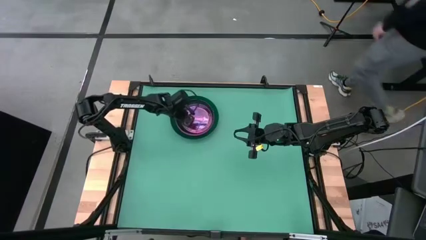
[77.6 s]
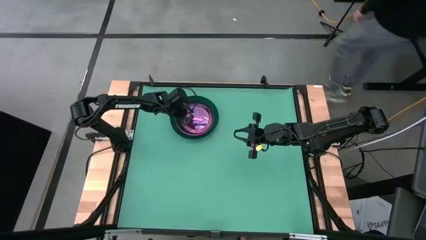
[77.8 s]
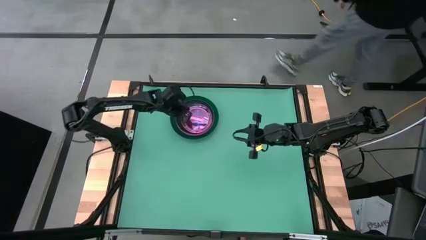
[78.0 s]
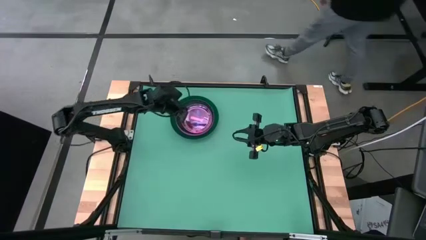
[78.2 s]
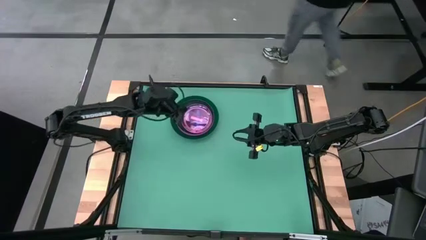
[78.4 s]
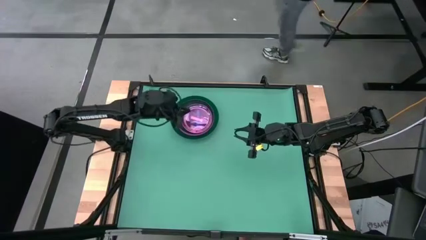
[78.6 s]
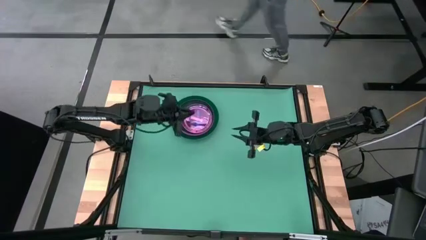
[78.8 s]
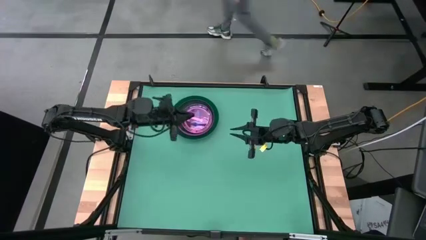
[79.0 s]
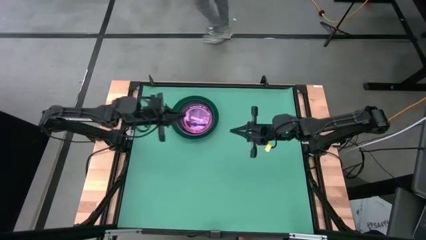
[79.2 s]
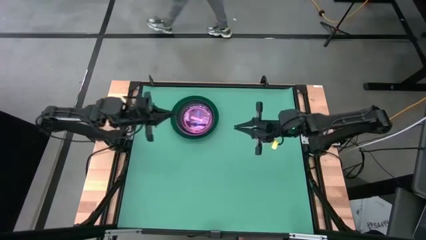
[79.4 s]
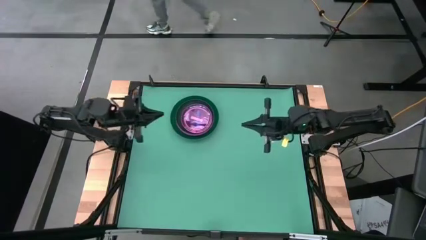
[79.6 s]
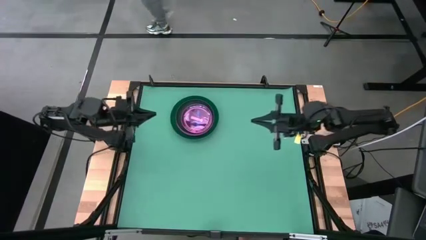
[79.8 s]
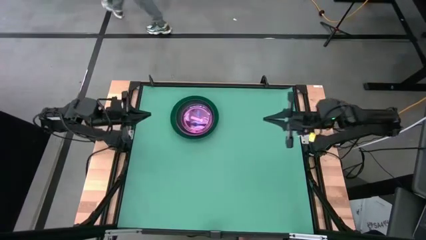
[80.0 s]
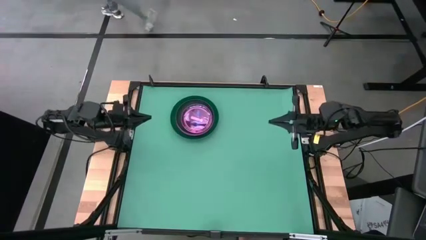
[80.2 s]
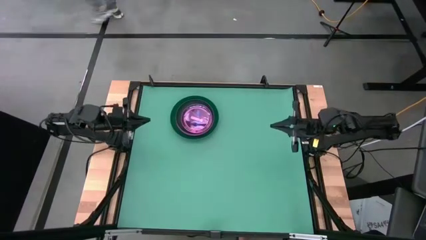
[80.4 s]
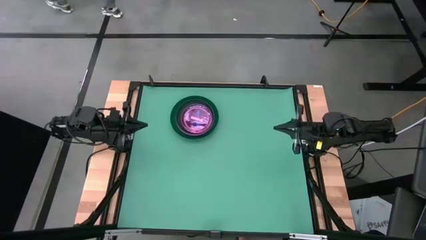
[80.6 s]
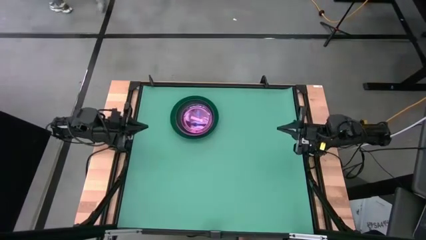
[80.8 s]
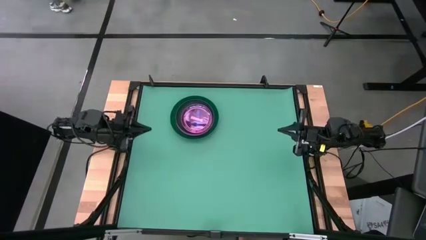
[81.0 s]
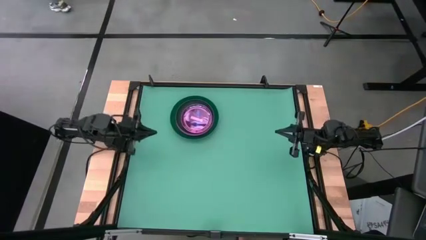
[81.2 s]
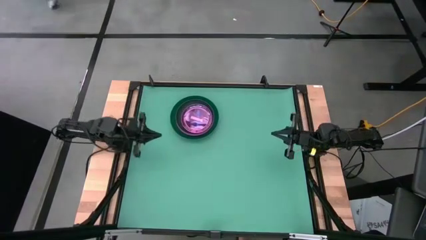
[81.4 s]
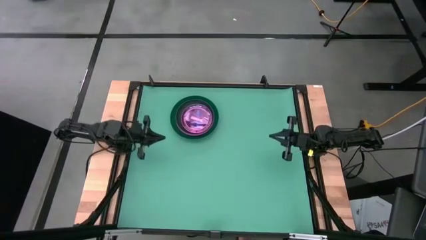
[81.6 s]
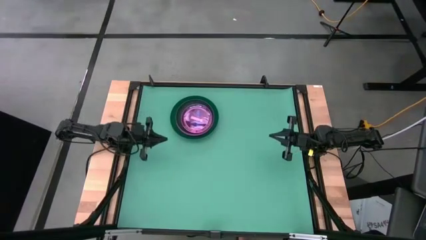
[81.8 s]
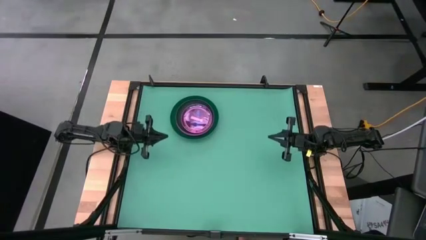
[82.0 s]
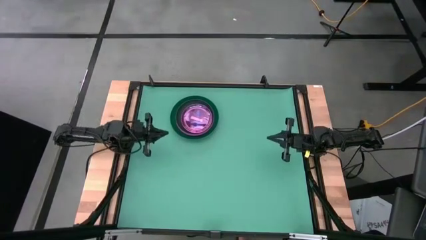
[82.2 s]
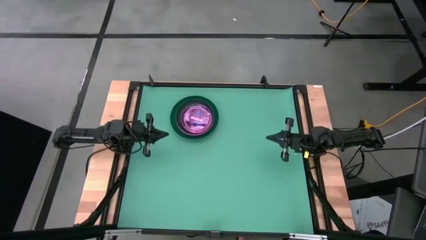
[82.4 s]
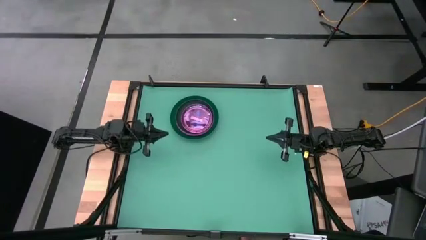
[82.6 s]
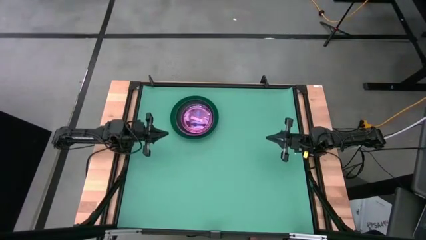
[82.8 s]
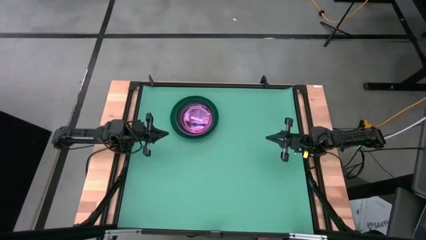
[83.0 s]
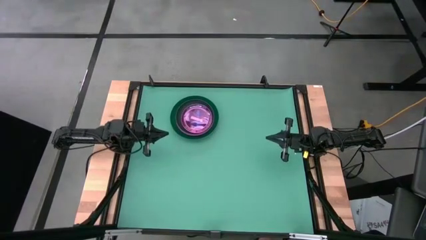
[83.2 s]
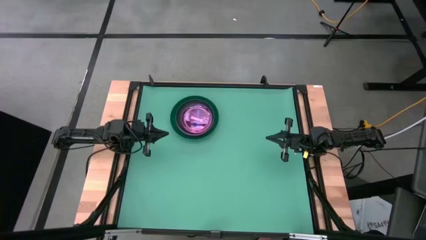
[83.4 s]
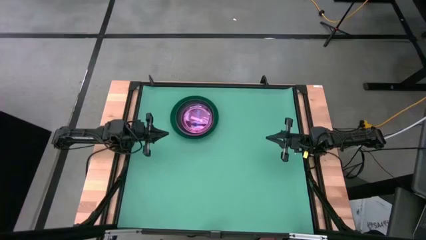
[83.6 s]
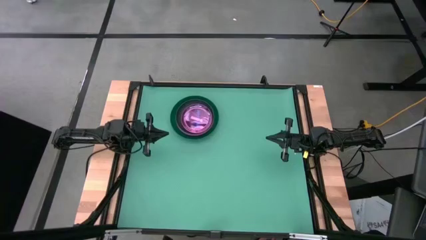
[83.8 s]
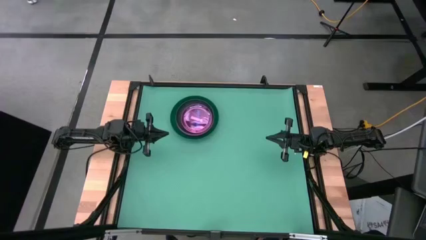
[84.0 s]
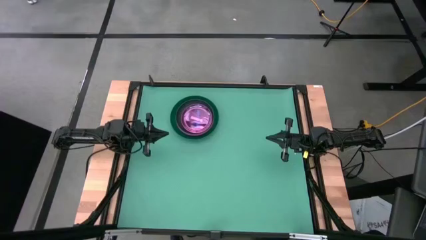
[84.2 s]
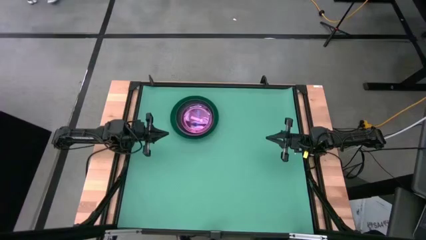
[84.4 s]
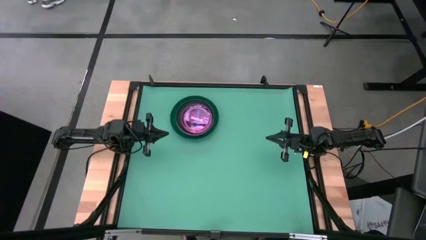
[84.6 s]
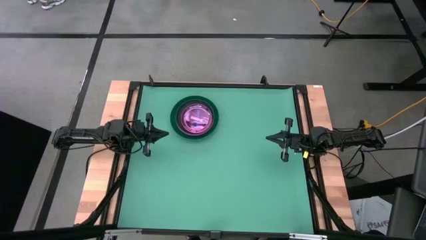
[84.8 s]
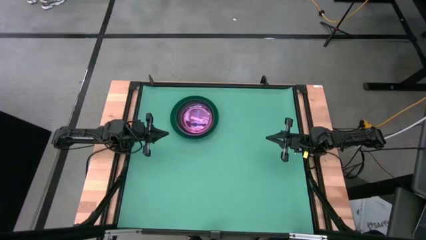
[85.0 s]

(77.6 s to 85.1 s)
Task: Stack plastic plates
Return to Home Position

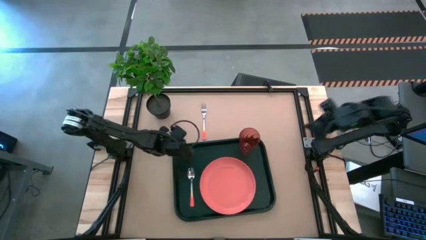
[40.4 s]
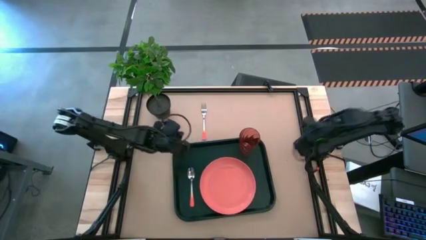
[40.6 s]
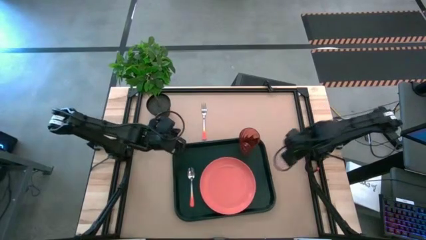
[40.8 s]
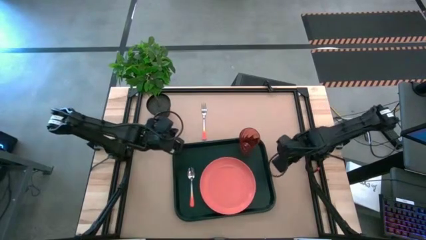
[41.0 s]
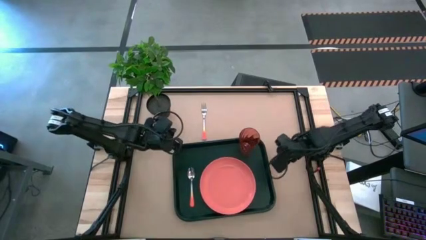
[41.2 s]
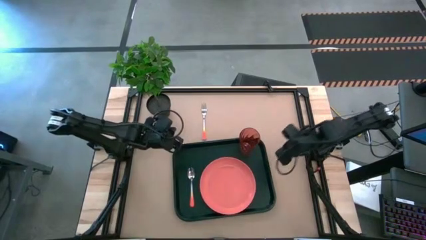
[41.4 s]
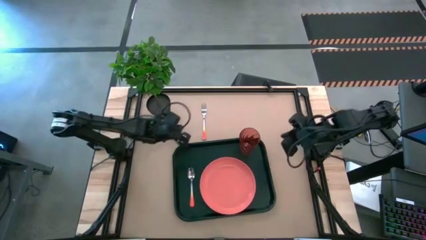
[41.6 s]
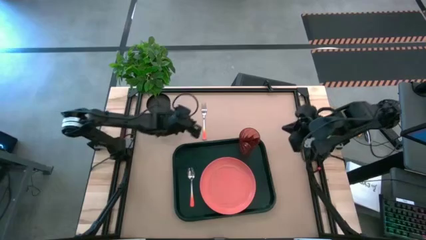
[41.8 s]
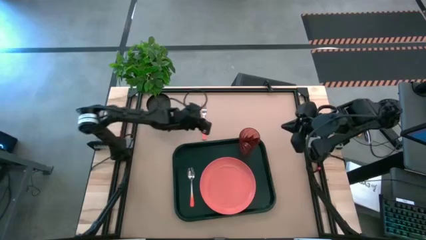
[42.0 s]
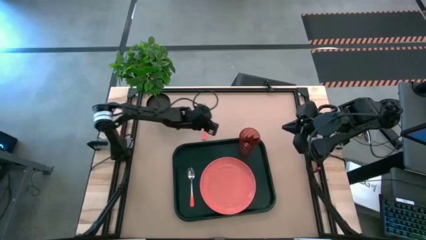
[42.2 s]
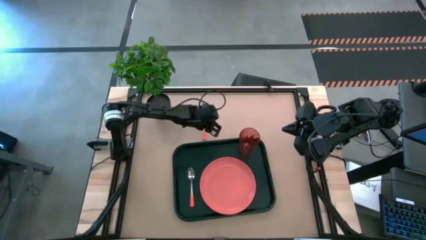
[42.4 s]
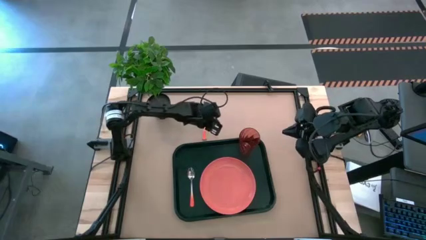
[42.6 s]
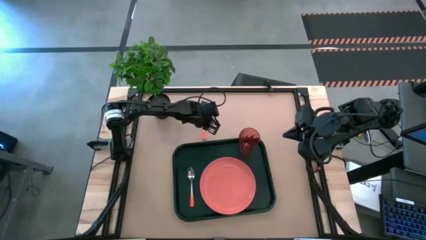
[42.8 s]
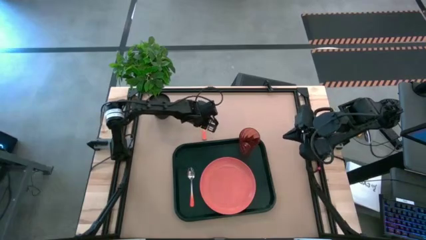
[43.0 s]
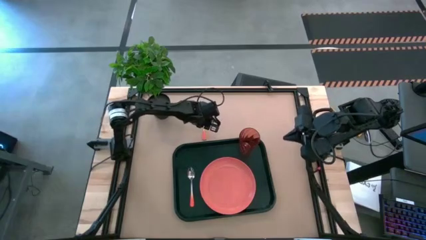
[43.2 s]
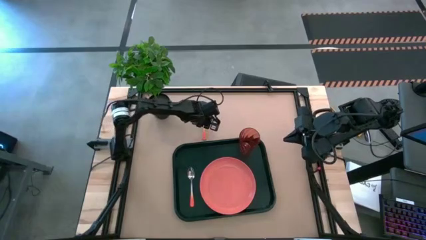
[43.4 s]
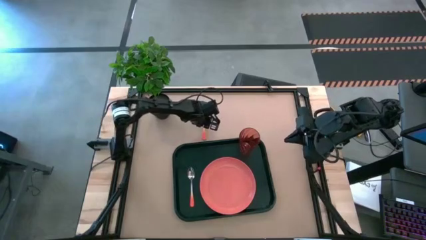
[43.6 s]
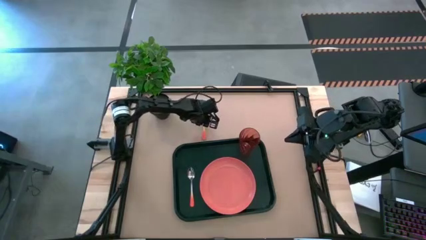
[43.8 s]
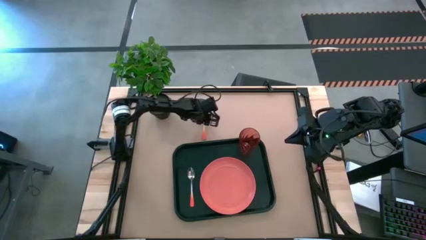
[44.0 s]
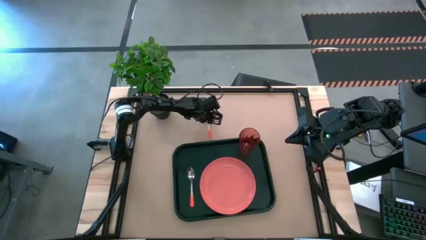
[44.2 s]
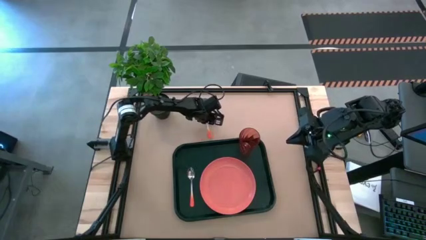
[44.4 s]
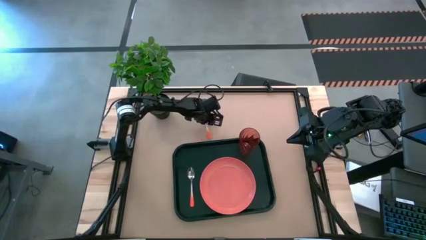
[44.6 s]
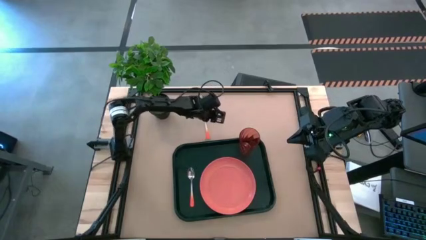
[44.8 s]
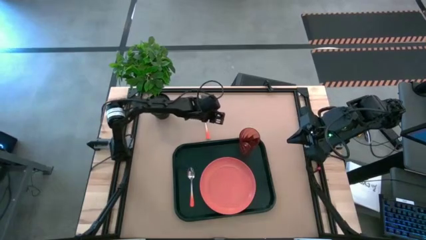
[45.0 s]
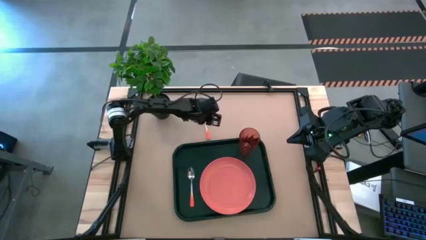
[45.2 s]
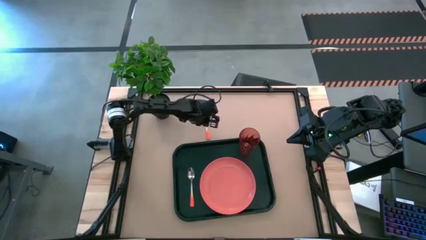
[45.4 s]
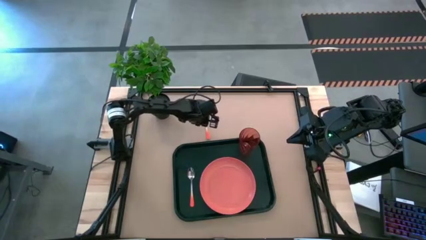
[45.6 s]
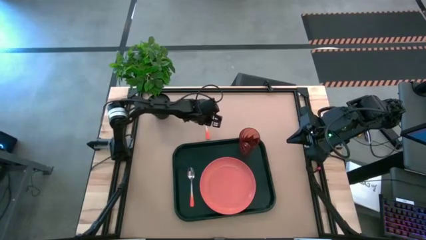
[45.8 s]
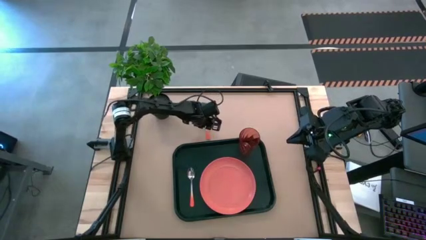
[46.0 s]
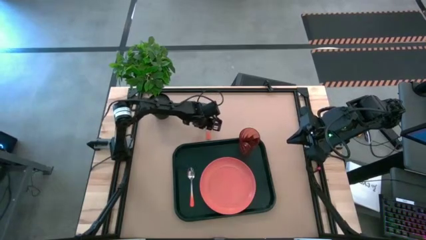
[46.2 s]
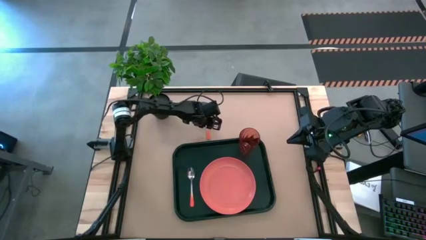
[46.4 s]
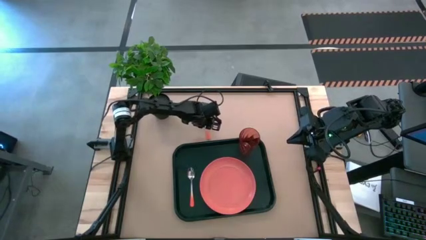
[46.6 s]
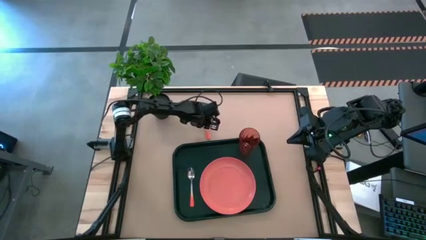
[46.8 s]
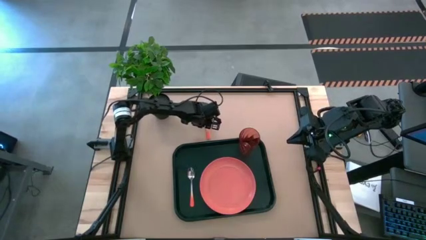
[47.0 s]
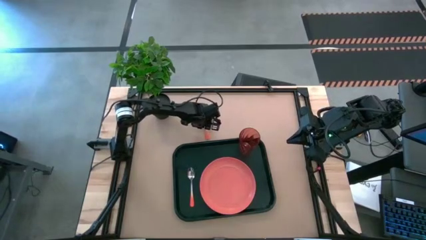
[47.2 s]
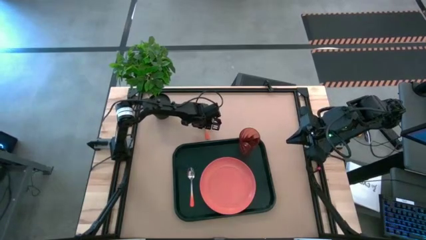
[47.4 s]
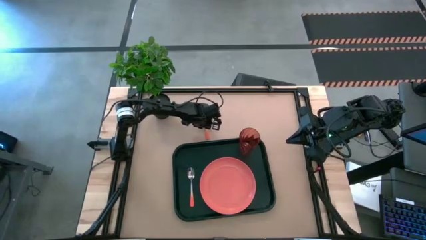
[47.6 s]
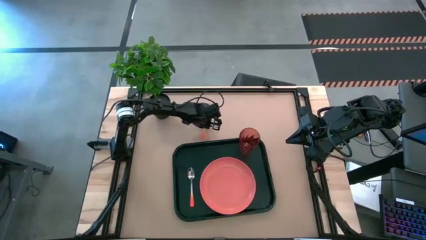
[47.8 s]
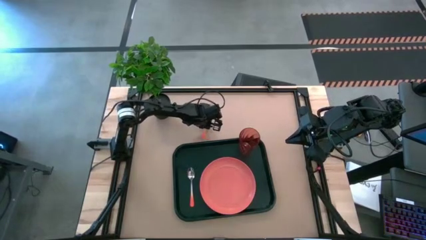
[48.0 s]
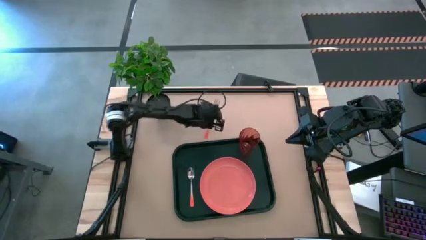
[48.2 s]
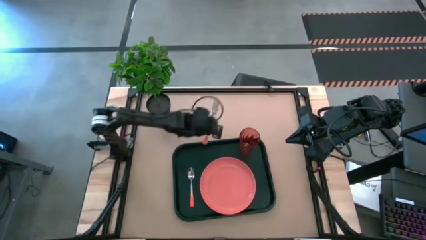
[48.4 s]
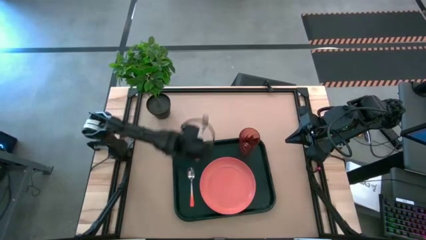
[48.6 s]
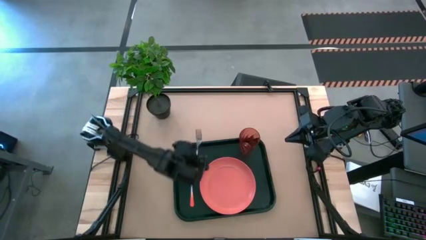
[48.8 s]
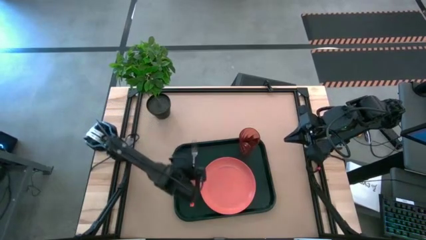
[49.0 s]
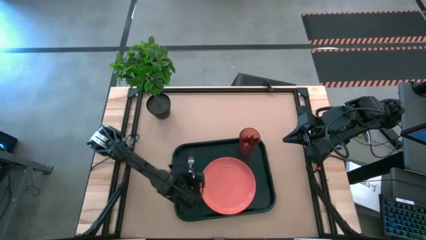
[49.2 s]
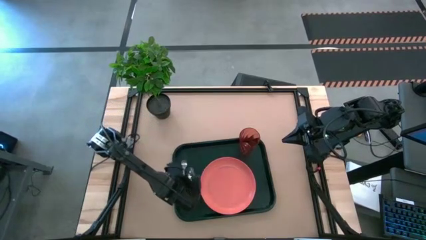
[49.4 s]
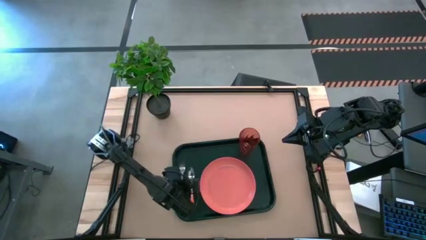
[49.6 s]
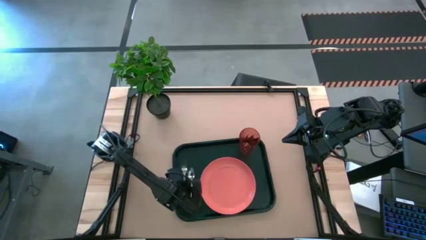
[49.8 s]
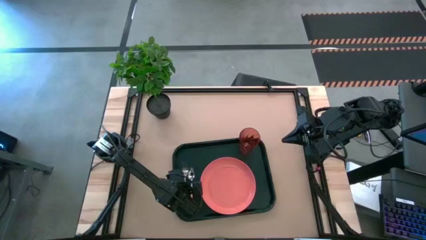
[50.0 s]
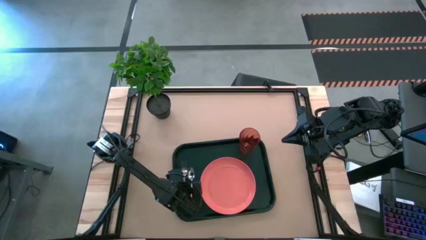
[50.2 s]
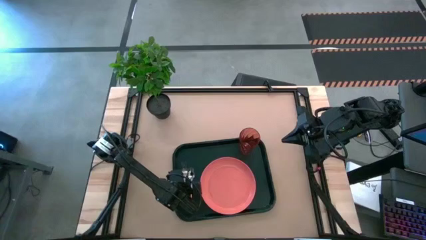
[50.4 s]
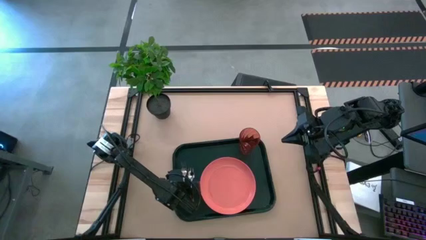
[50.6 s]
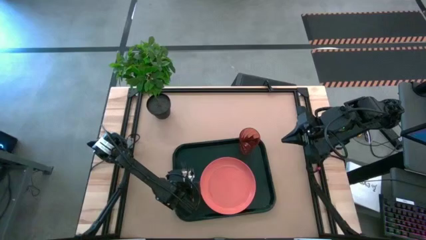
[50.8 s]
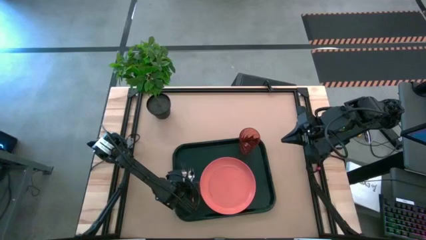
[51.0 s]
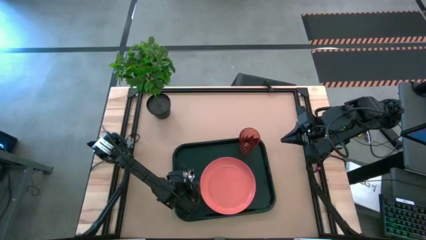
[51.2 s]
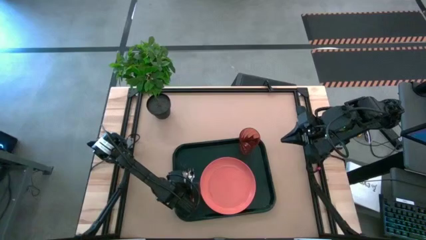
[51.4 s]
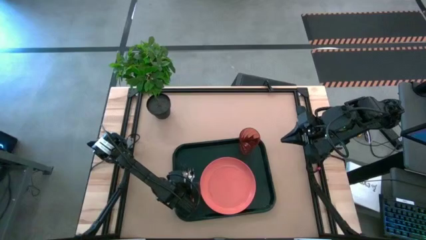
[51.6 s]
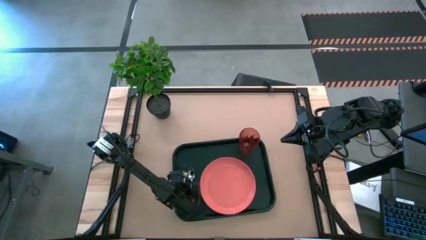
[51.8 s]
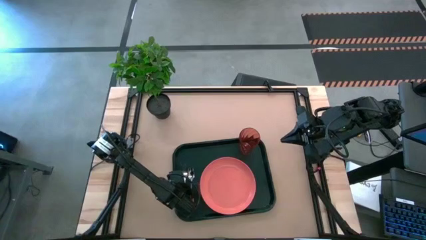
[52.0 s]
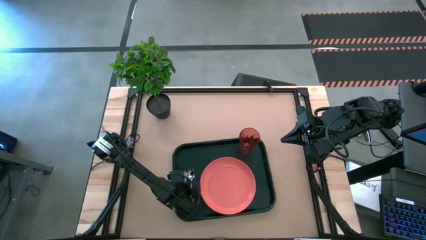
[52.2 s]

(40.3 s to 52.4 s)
Task: Pick and place plate/cup/fork/spoon on tray
Put the orange fork on the black tray to left of the orange spoon
